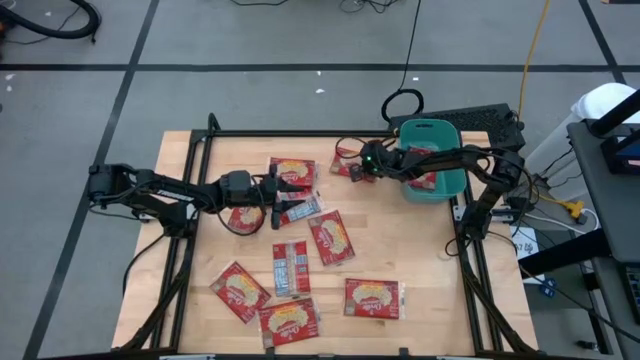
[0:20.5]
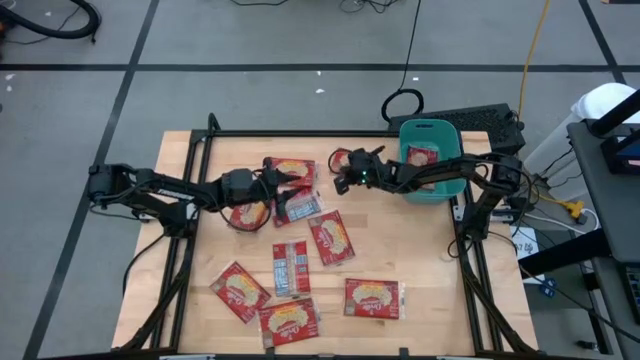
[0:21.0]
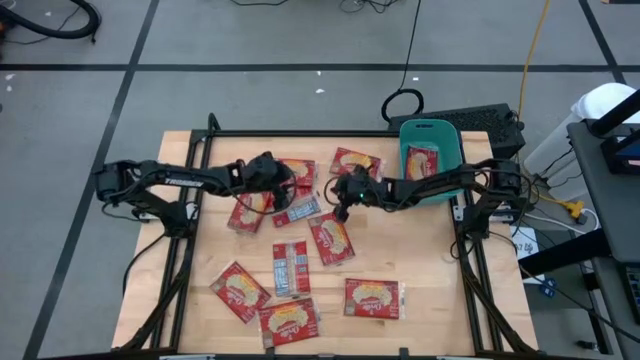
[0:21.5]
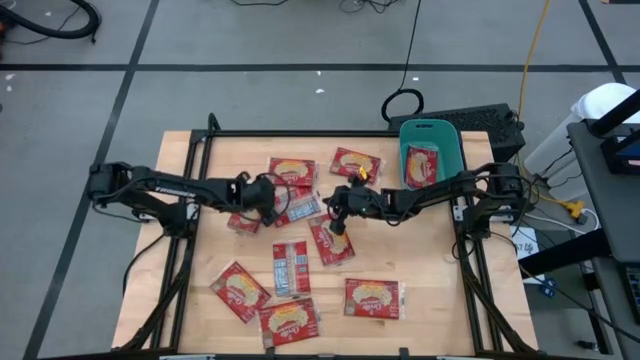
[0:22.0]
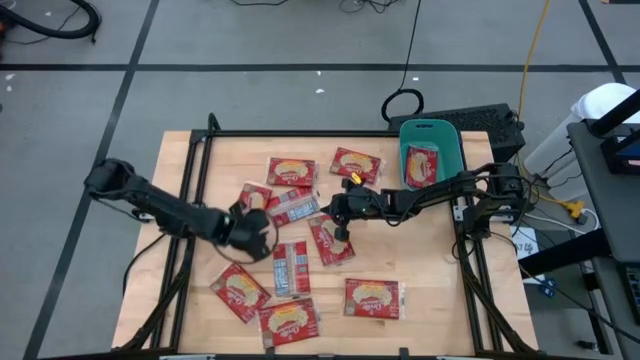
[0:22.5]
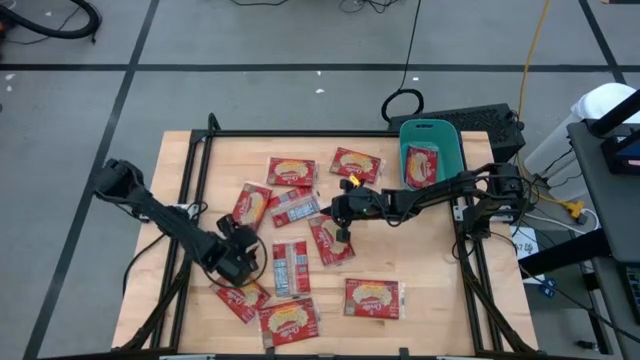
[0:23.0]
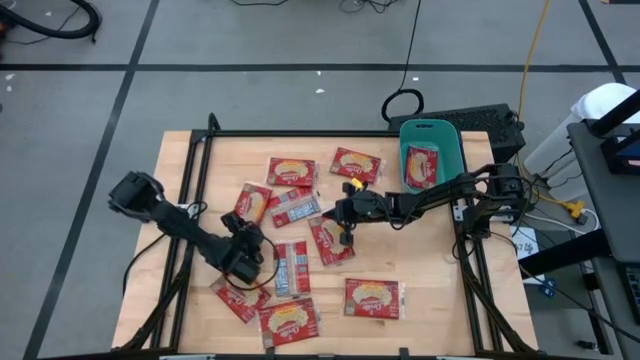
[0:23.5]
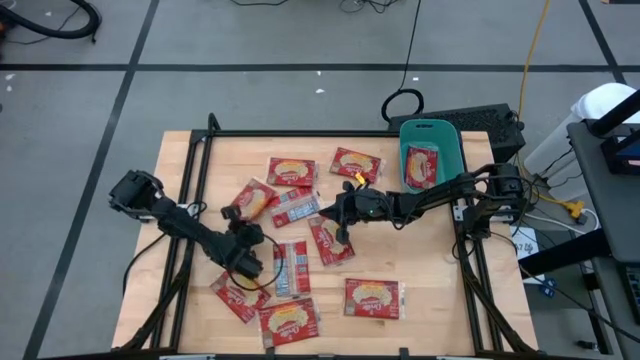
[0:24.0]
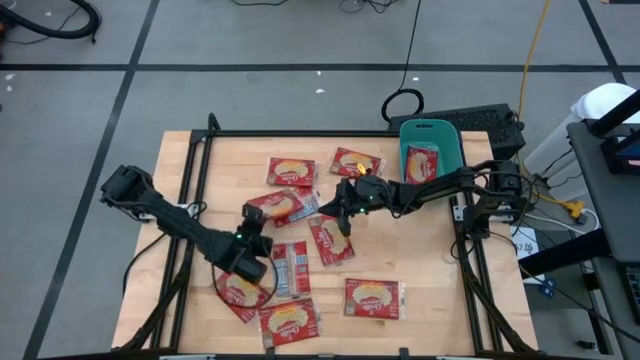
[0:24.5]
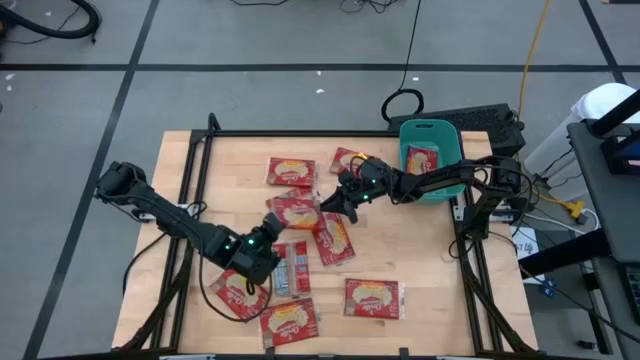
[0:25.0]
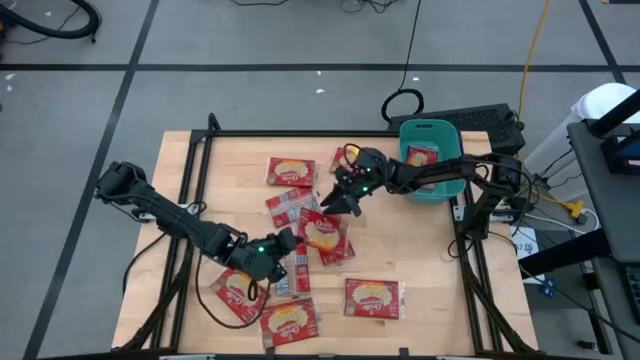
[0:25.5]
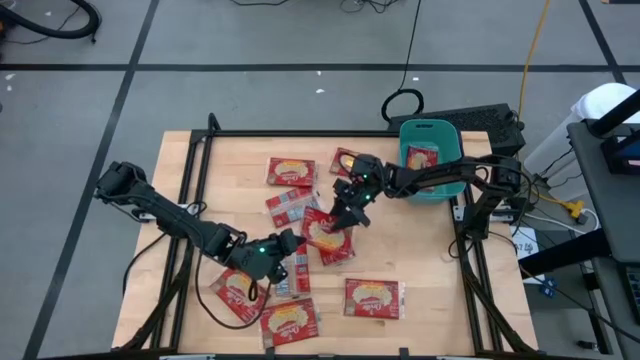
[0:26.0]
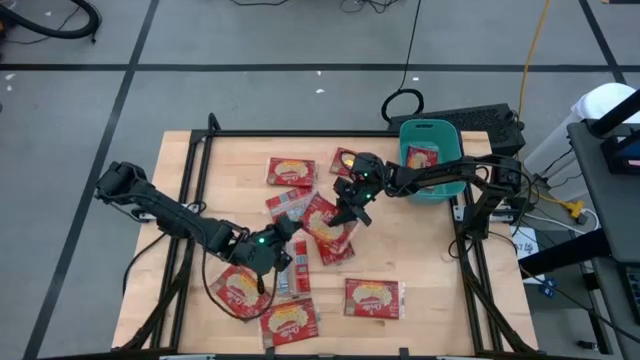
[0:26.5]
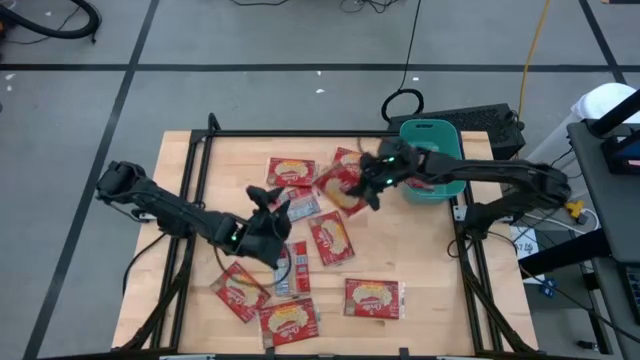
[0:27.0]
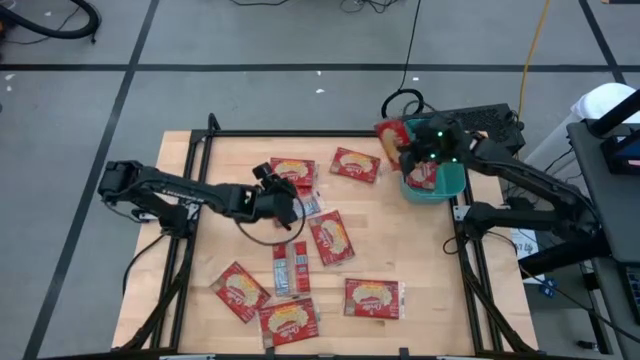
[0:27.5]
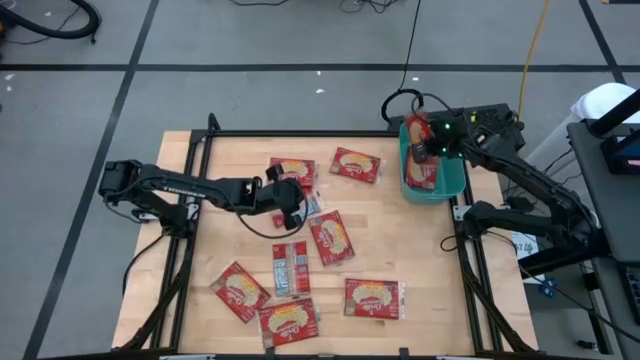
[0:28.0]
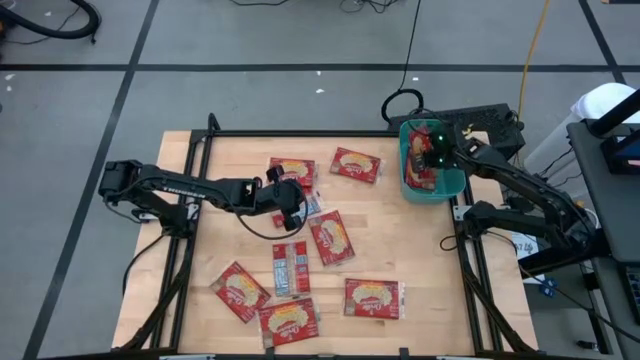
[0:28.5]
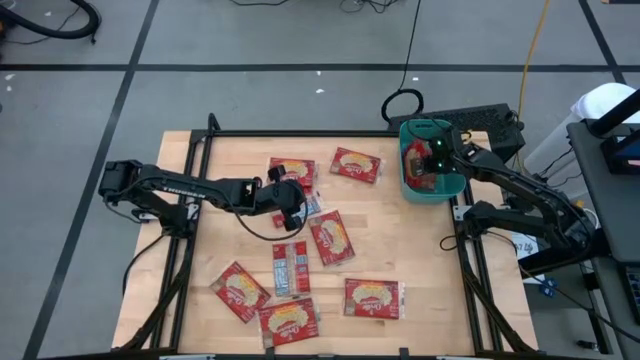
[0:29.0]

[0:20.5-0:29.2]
Task: Sort popcorn bags into baskets
Put the red popcorn bag into the green bin

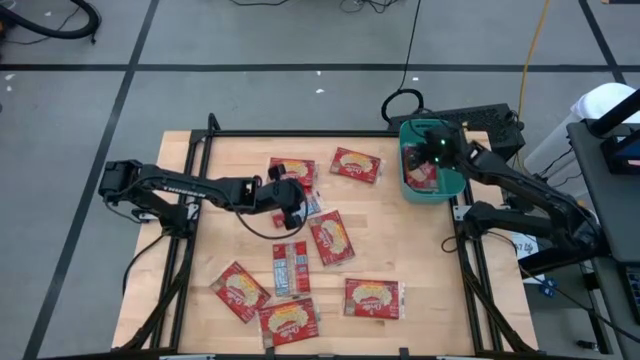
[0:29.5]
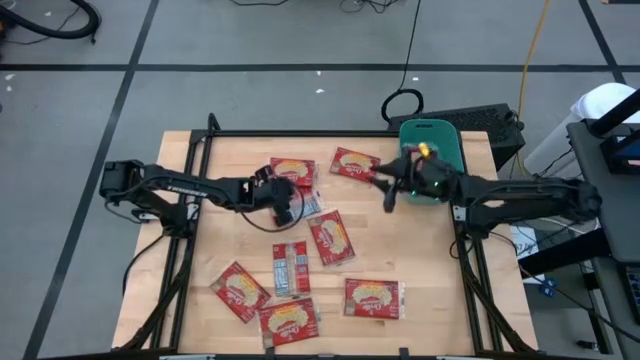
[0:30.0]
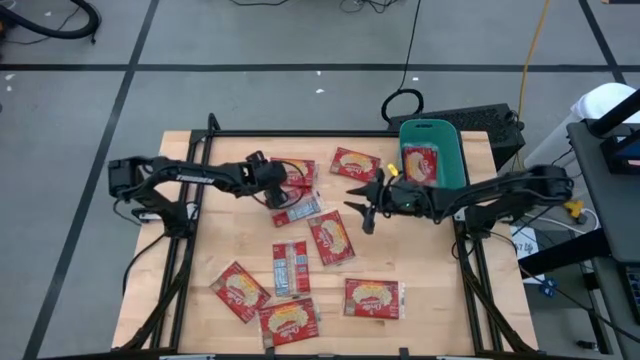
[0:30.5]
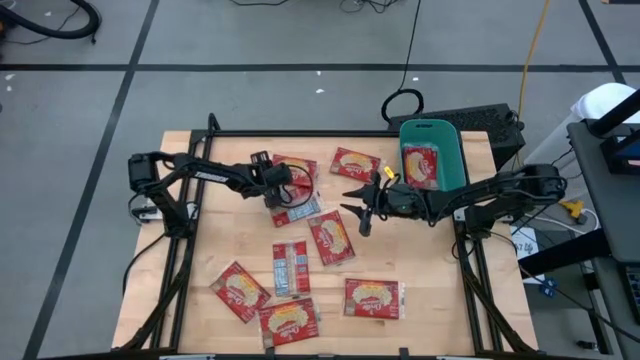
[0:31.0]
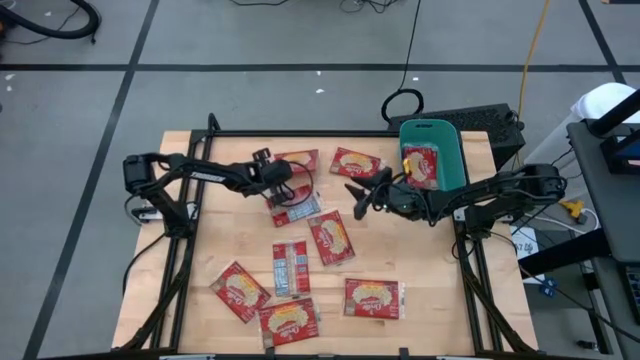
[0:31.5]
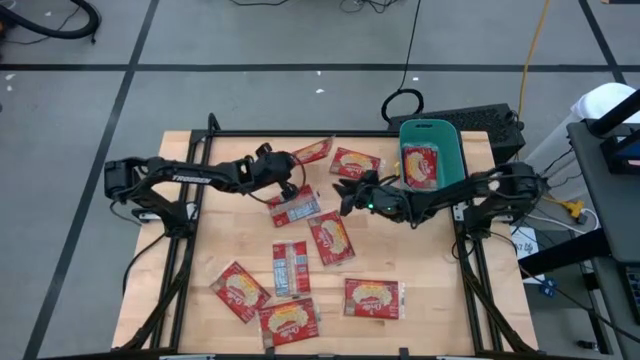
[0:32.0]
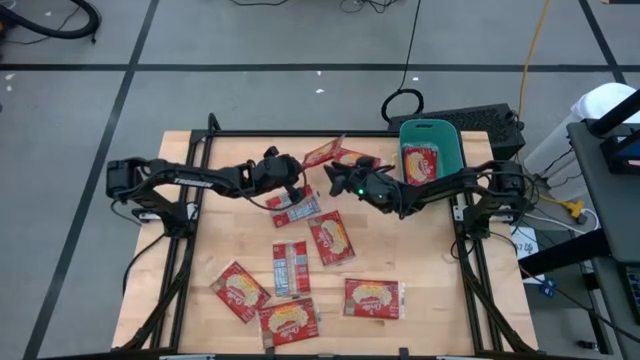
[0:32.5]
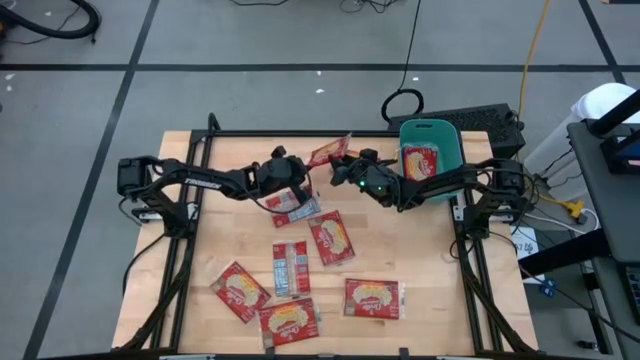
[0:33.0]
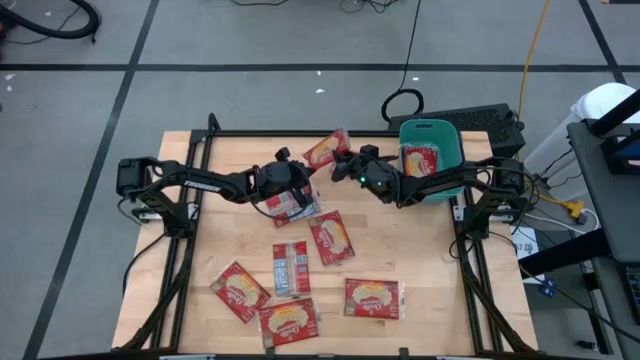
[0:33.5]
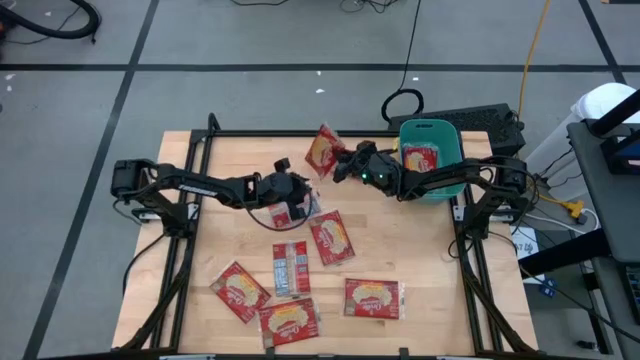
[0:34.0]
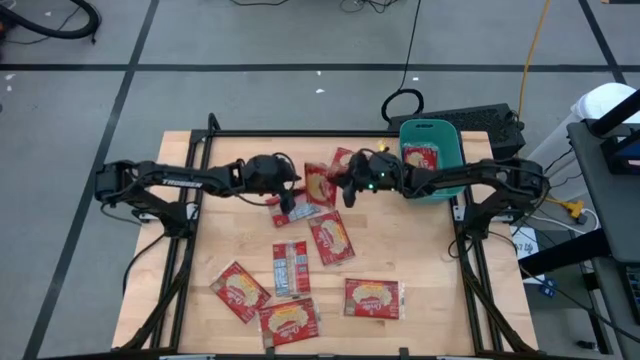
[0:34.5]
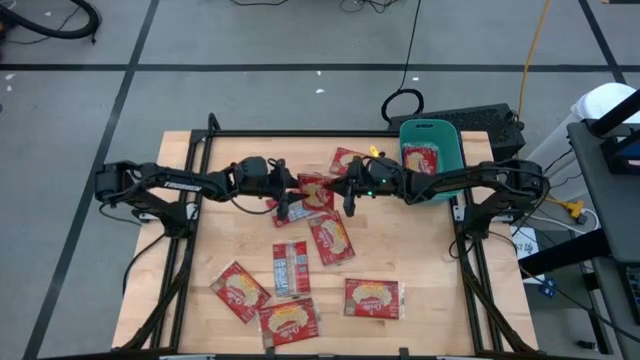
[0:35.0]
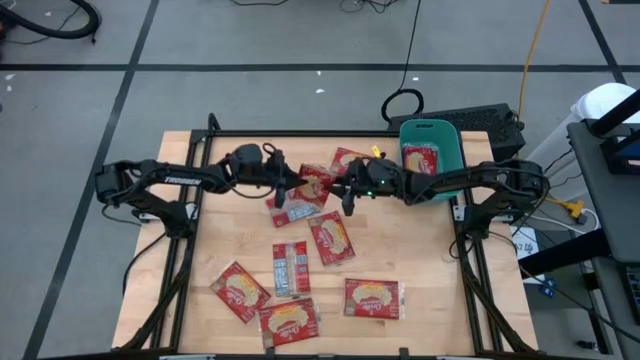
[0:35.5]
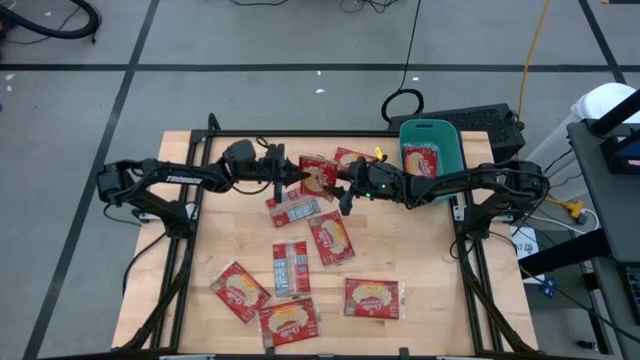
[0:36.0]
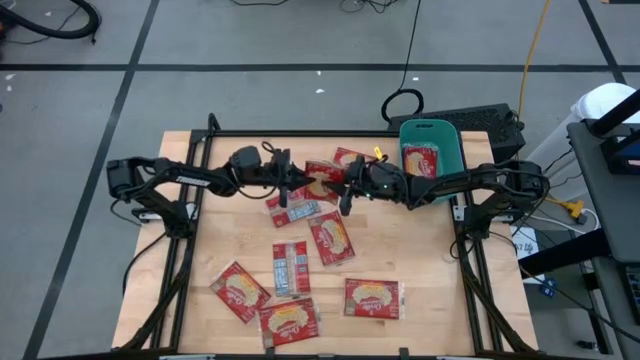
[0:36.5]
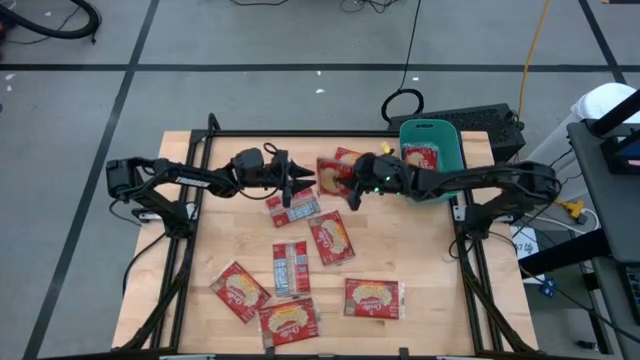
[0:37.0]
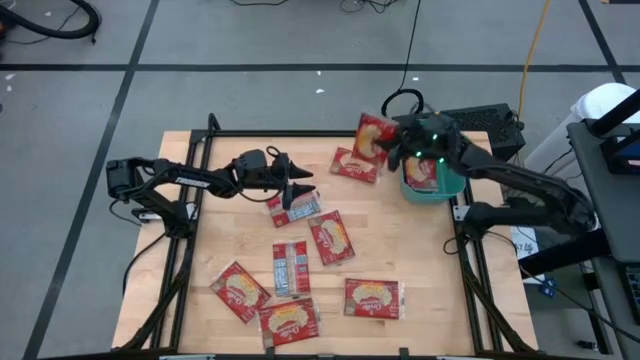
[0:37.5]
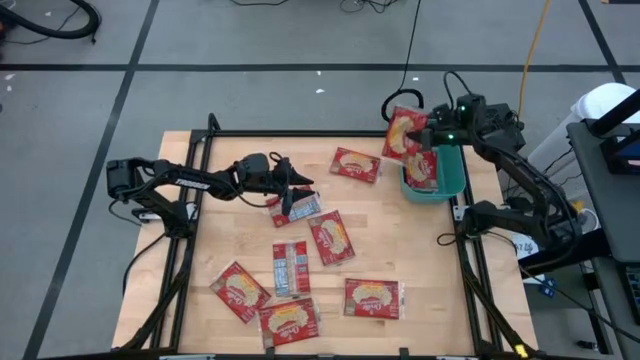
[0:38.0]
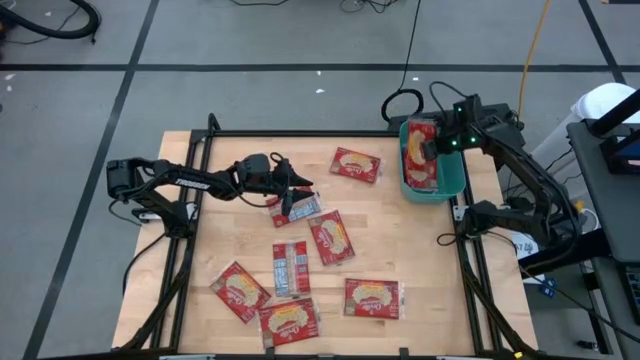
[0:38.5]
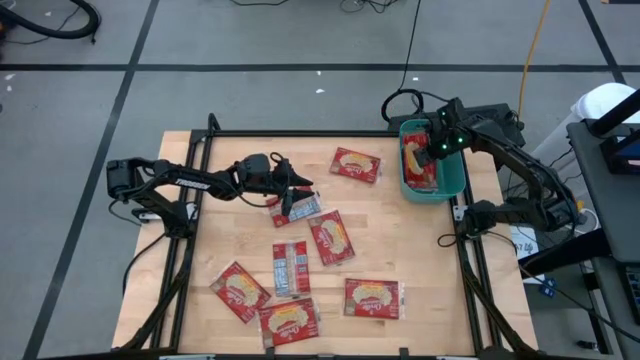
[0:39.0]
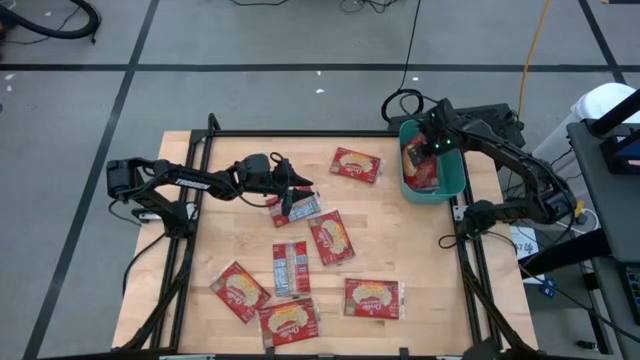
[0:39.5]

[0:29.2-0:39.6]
Put the red popcorn bag into the green bin

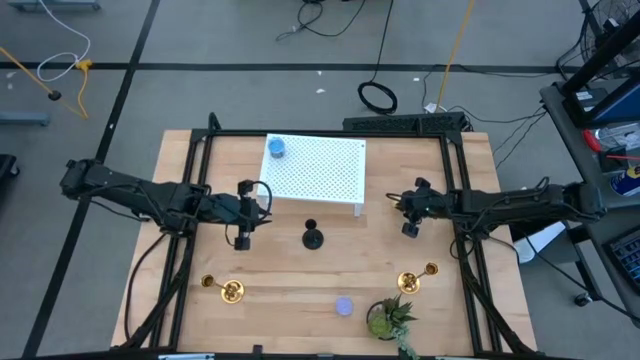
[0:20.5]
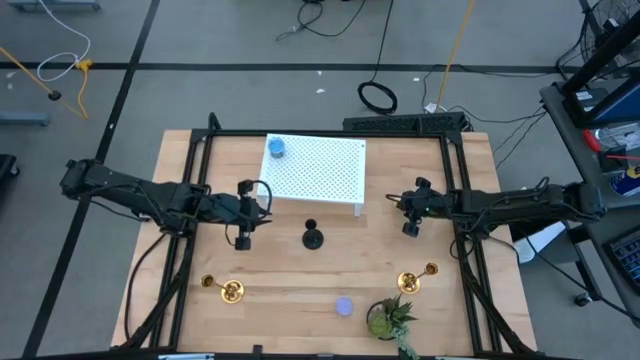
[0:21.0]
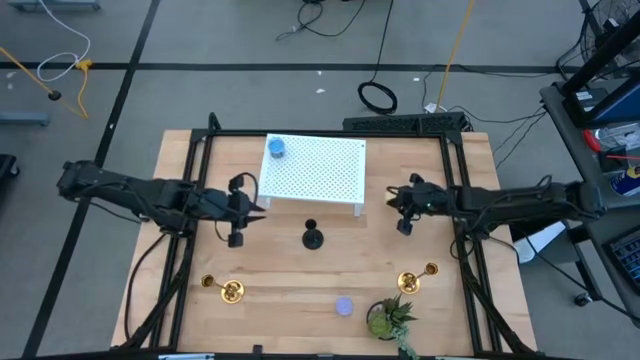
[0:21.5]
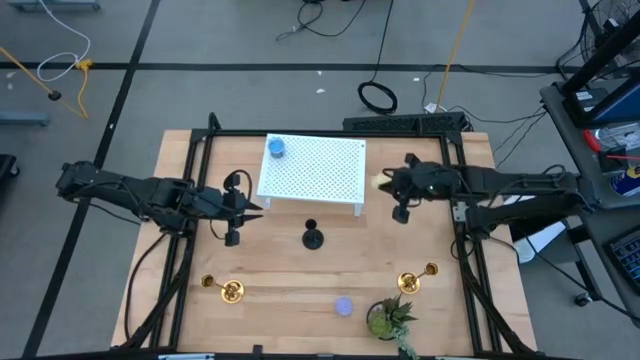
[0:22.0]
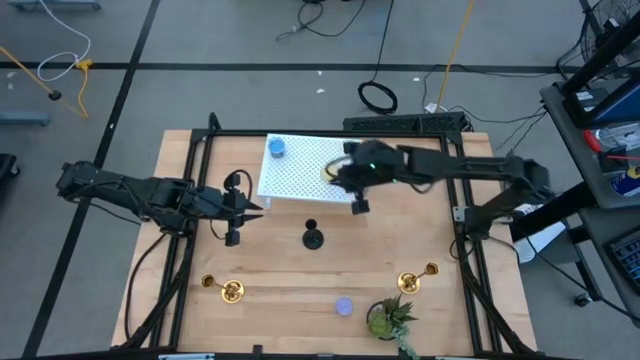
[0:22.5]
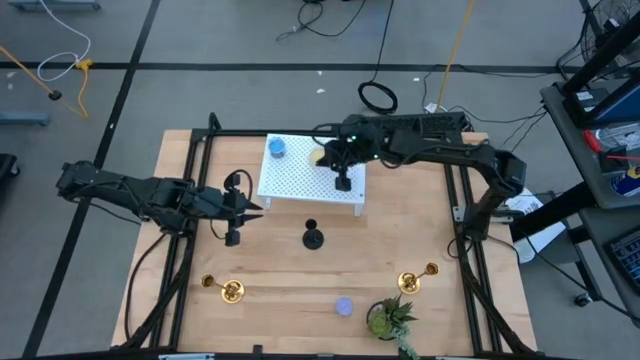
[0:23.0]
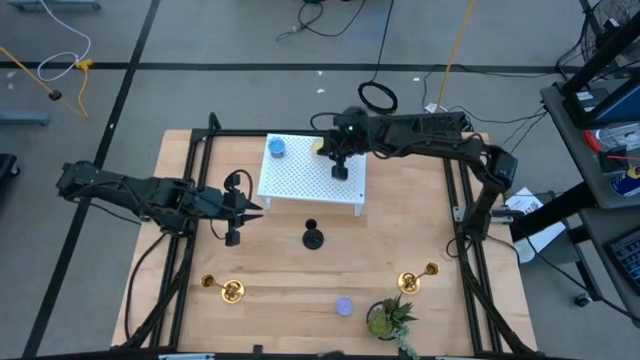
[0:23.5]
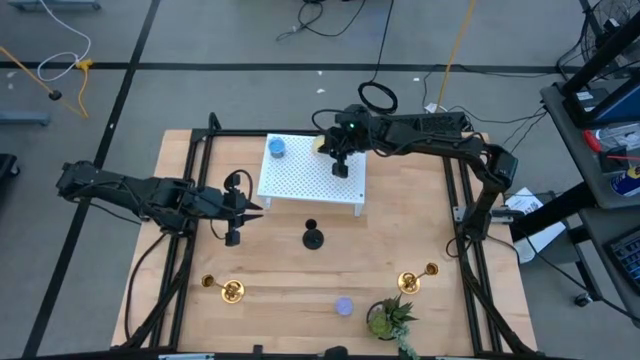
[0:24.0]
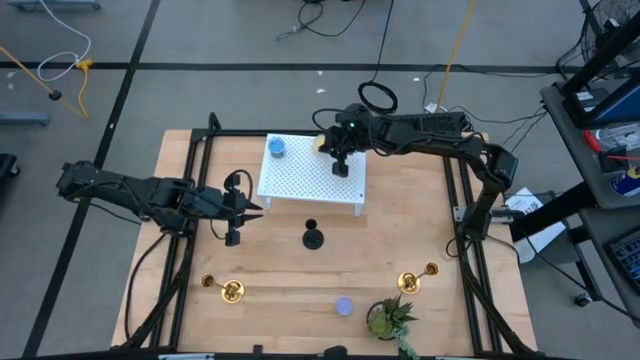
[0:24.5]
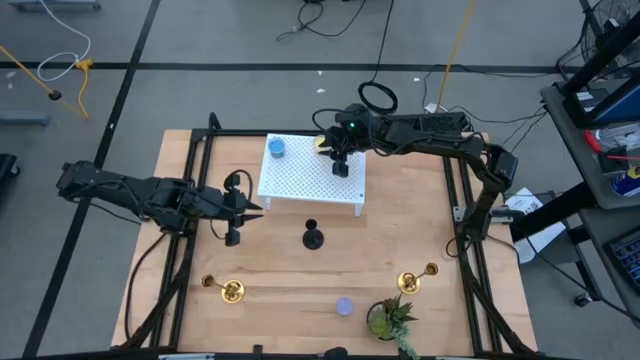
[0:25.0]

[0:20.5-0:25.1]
Task: Pick & Place candle stick holders
Put the yellow scented candle on the shelf
